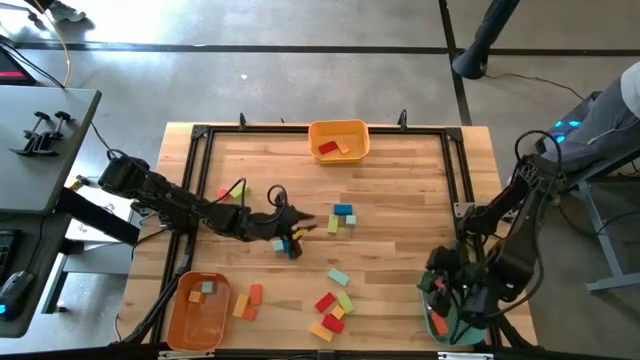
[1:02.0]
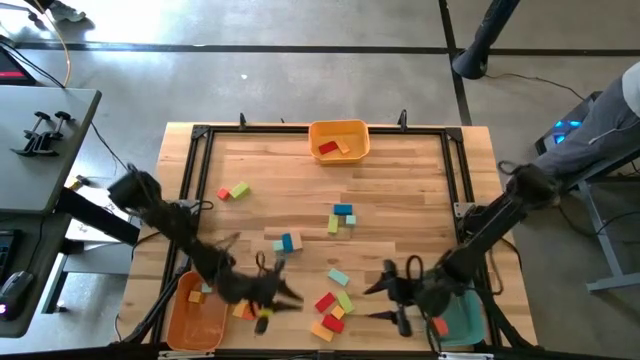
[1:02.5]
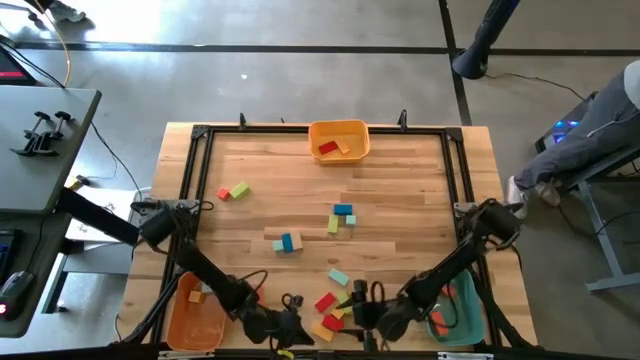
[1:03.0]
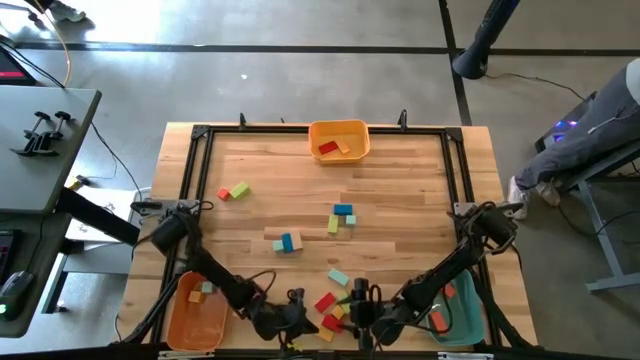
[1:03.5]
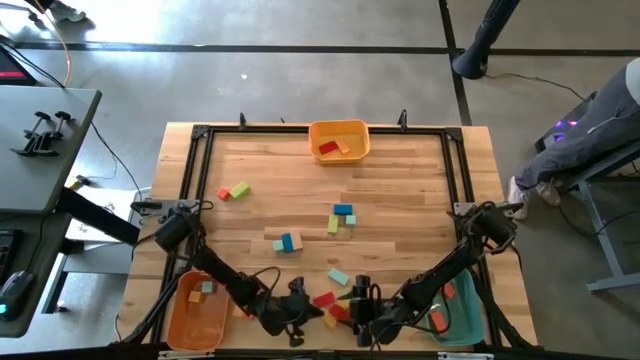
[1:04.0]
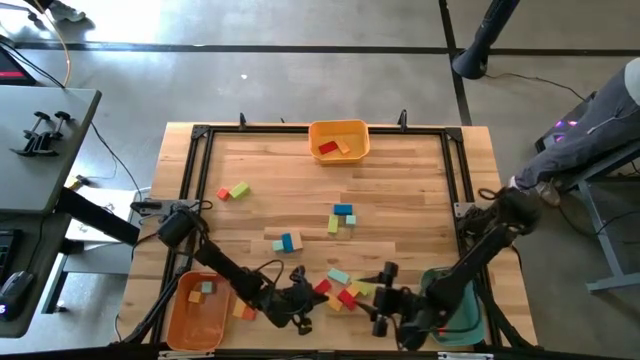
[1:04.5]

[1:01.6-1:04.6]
Task: Sort blocks by size
Adjust the blocks

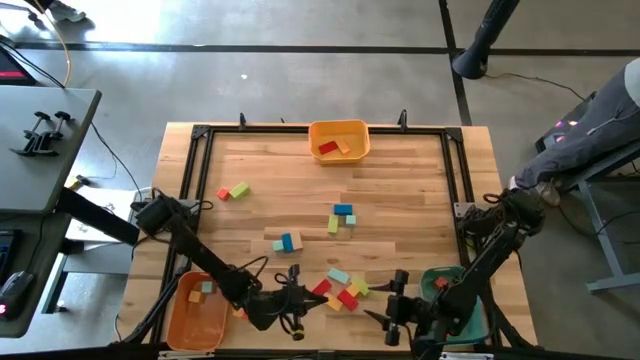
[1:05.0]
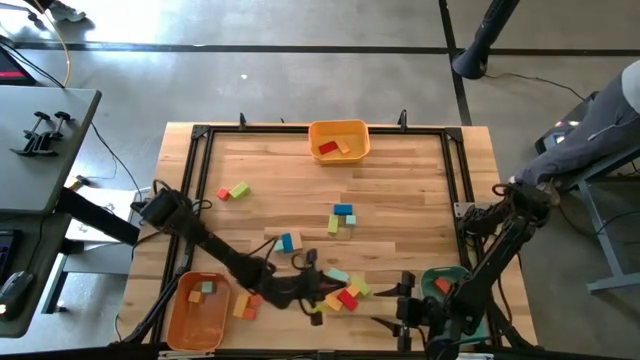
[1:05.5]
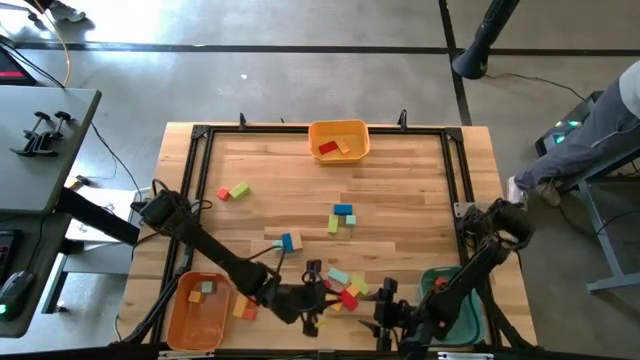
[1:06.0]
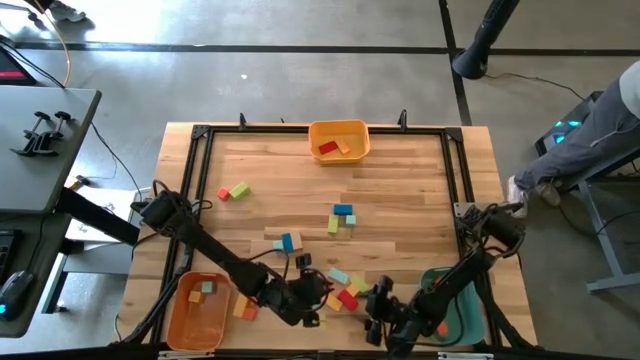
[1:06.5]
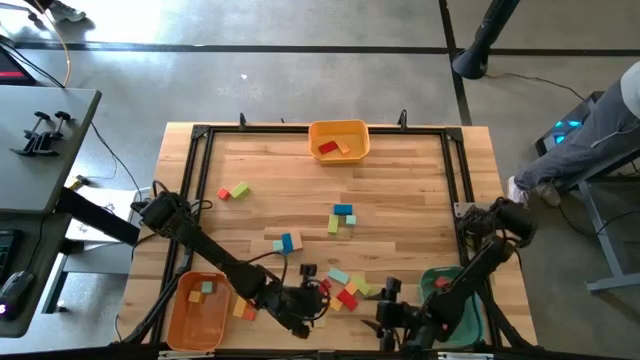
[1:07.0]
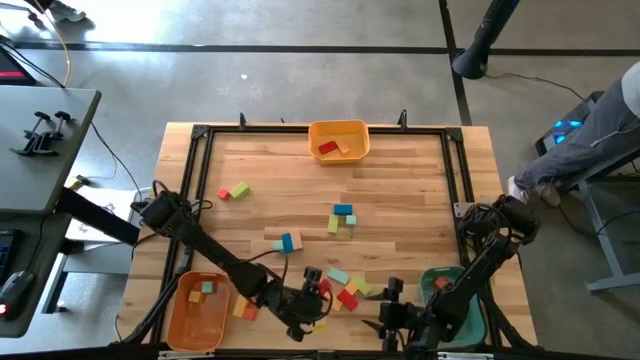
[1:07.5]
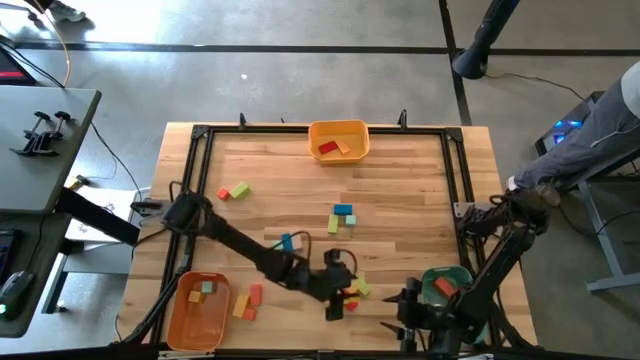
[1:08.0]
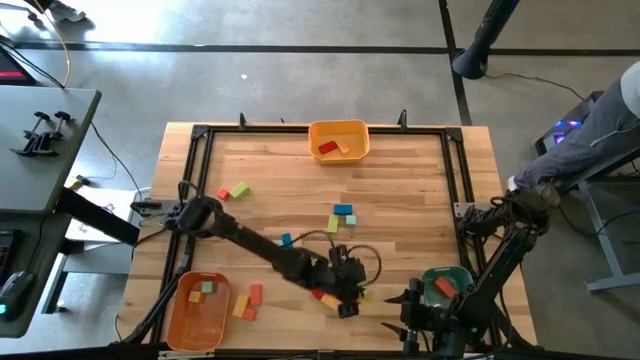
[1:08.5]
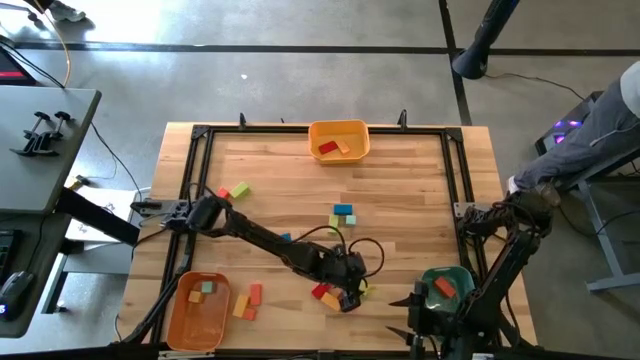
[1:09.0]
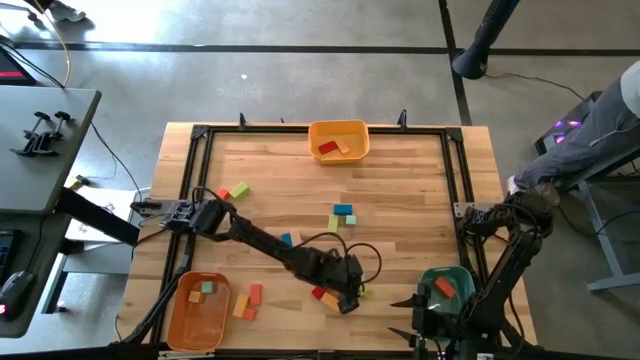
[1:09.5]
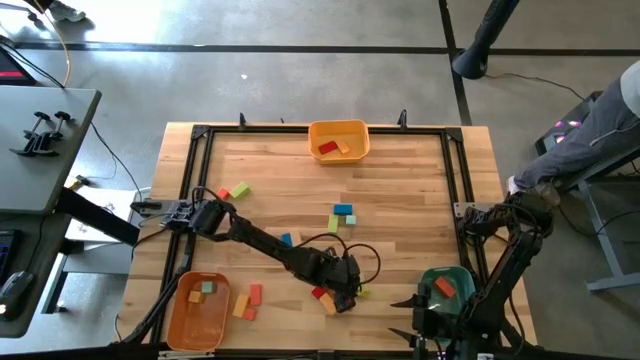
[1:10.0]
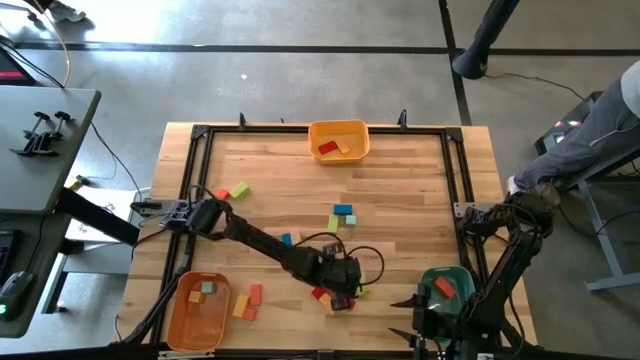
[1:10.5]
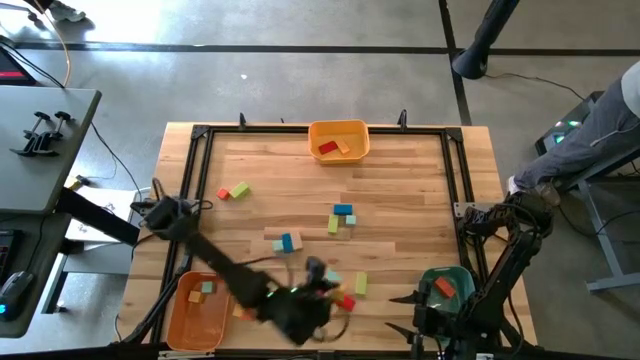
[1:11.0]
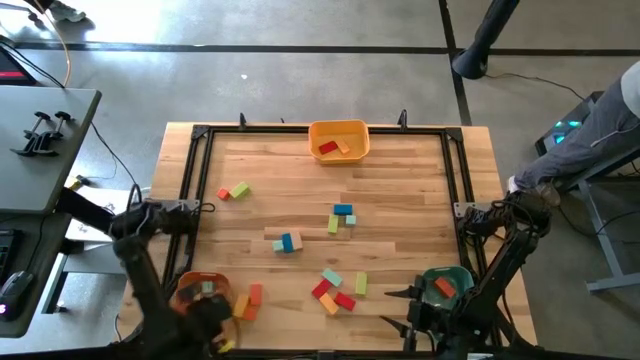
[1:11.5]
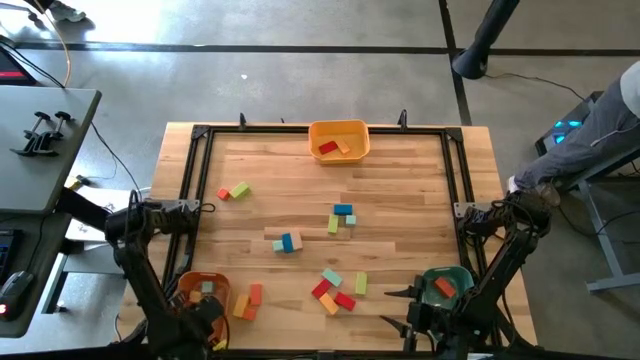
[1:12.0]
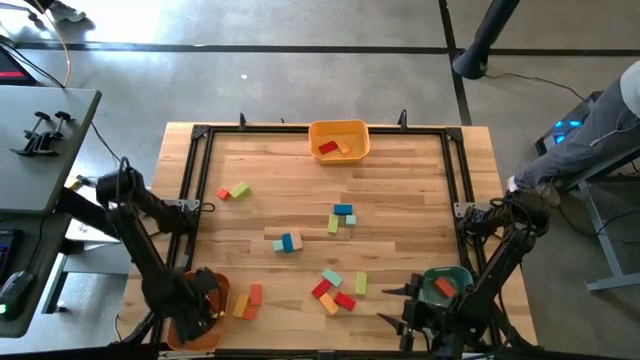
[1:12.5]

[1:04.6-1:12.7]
Put the yellow square block into the orange bin

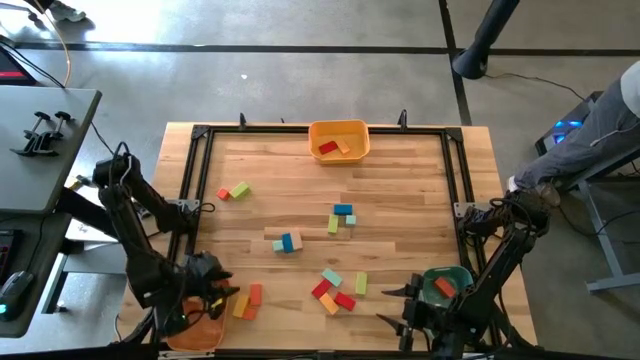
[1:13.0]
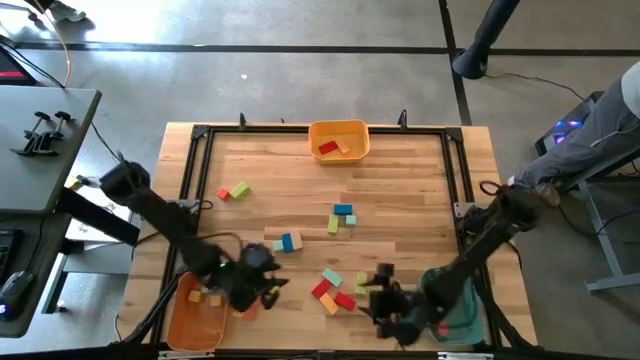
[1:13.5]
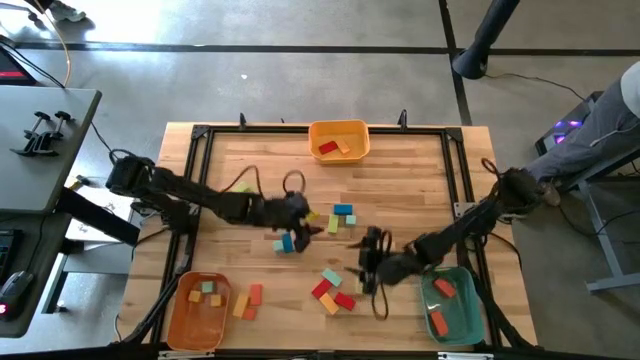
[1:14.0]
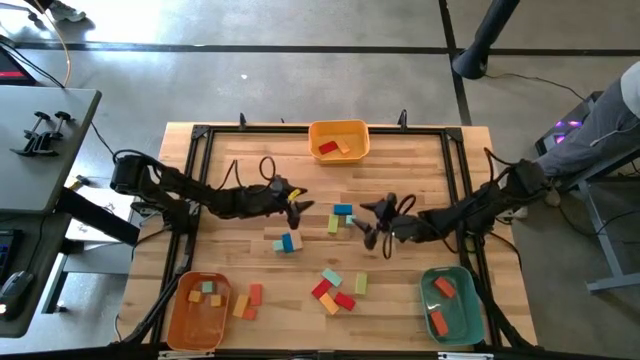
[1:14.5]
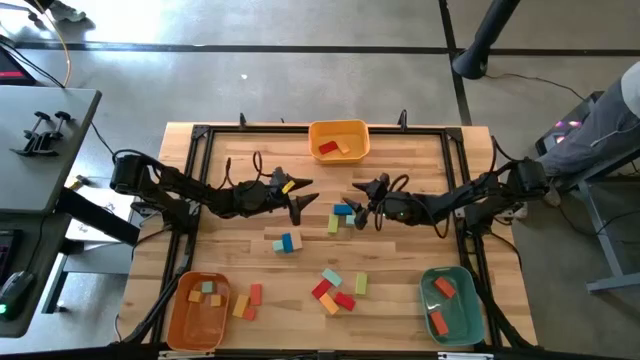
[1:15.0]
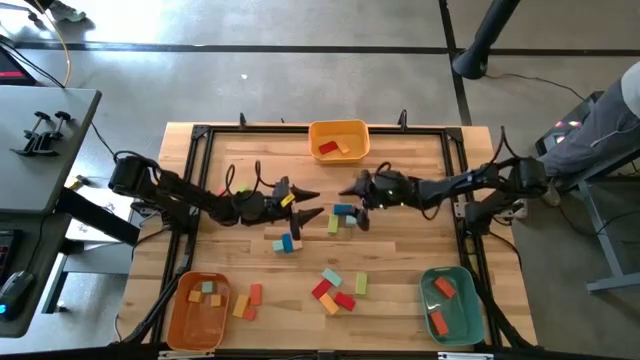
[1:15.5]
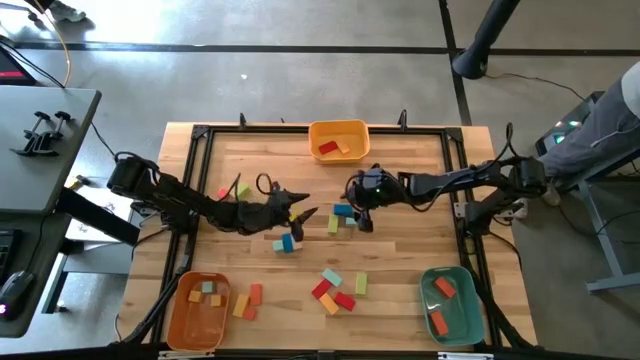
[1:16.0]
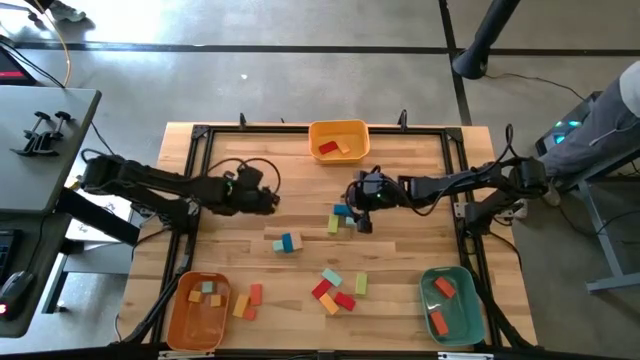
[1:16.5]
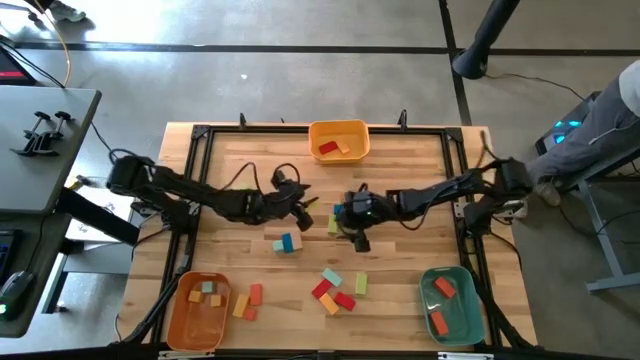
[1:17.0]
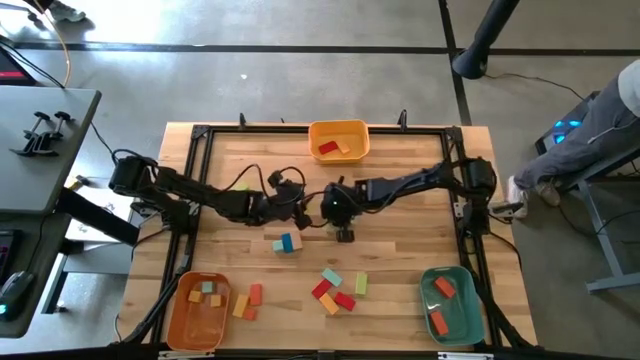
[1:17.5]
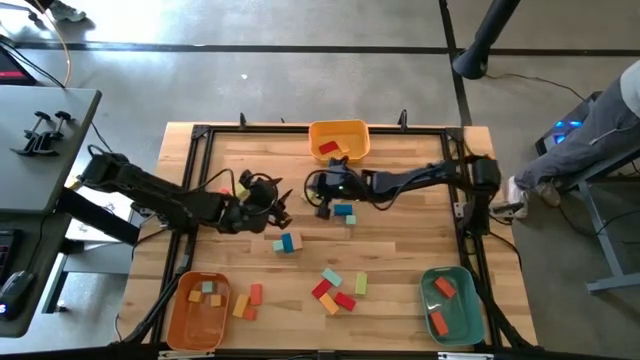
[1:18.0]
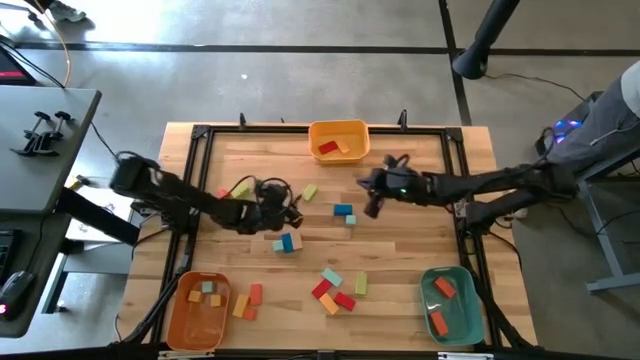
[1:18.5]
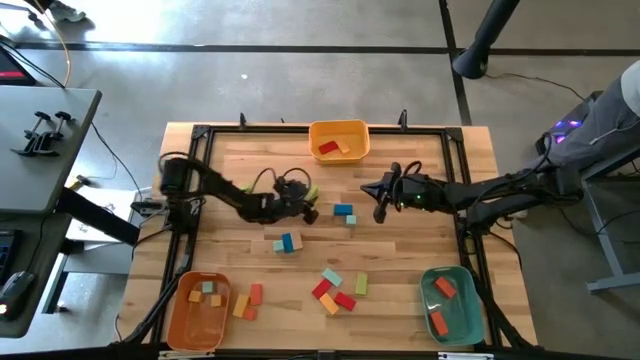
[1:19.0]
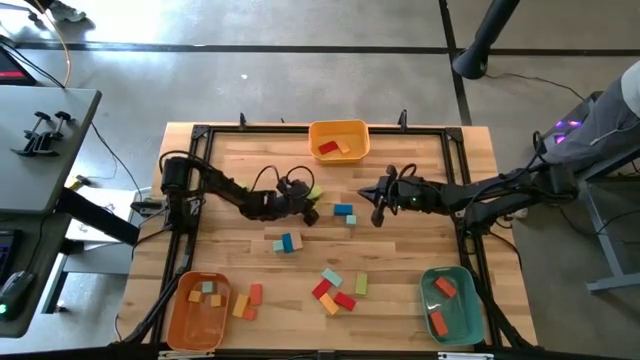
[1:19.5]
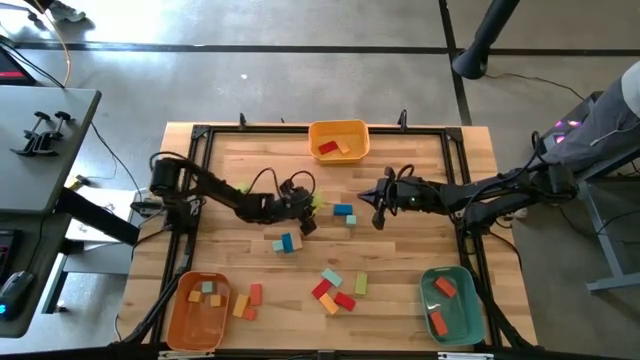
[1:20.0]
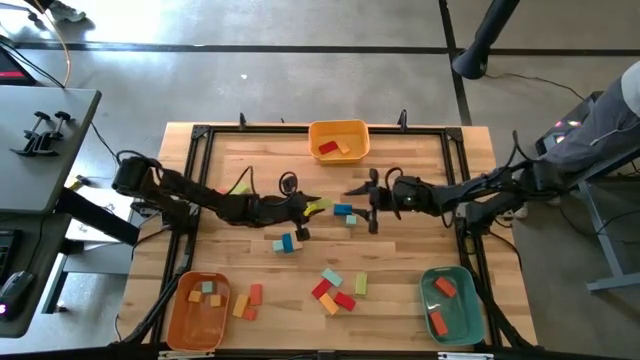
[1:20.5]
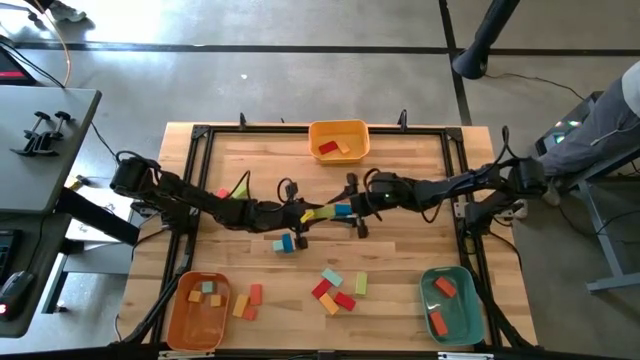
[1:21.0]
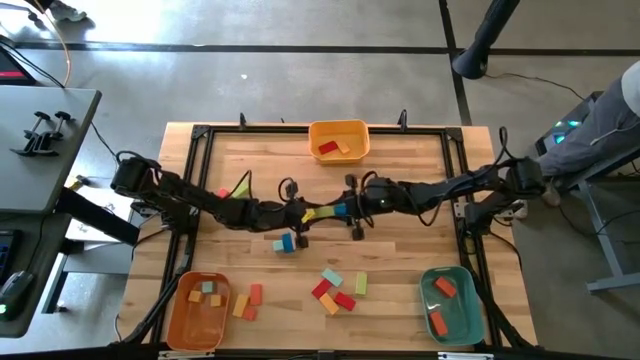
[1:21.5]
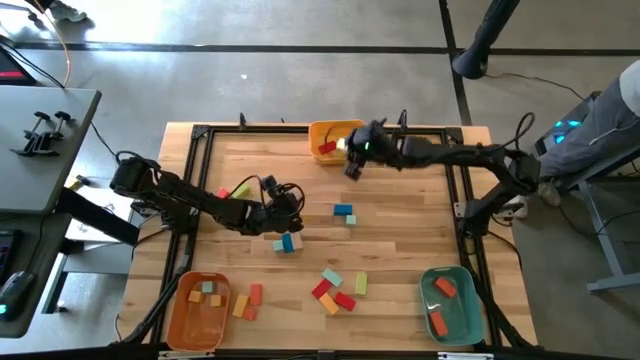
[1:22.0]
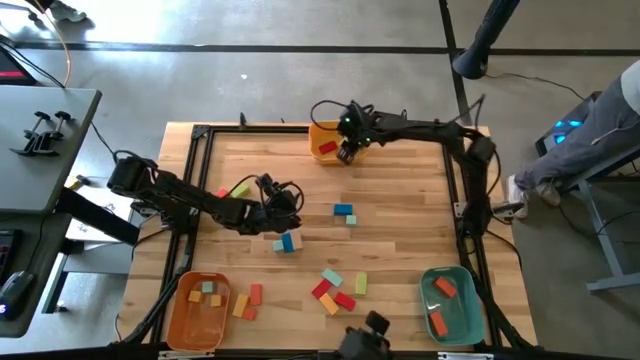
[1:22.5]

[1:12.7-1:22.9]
Put the small green rectangle block into the yellow bin

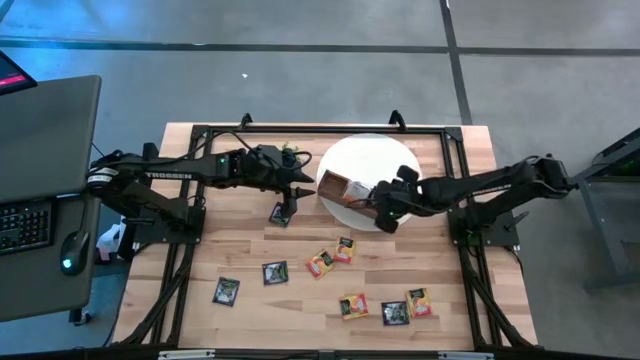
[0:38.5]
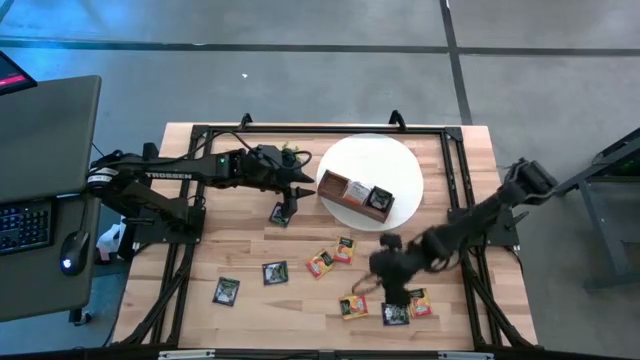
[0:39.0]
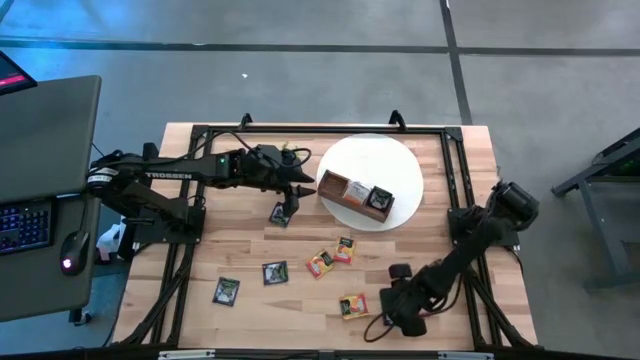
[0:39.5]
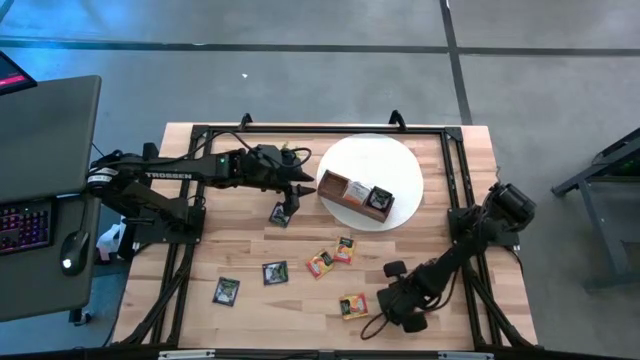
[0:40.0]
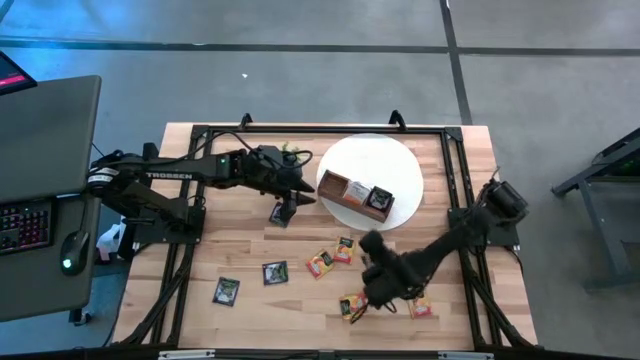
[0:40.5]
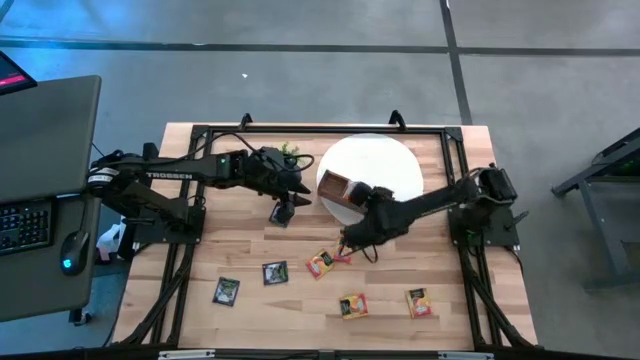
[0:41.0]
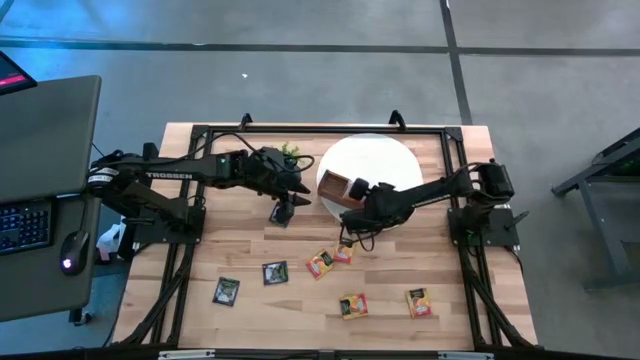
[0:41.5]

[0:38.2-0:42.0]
Task: Pick & Place Tea
Put the purple tea bag into the right compartment of the wooden organizer
